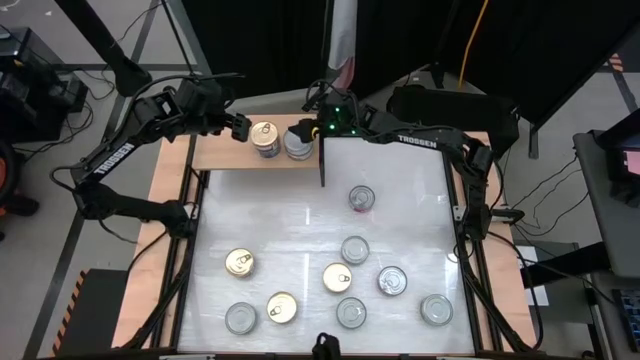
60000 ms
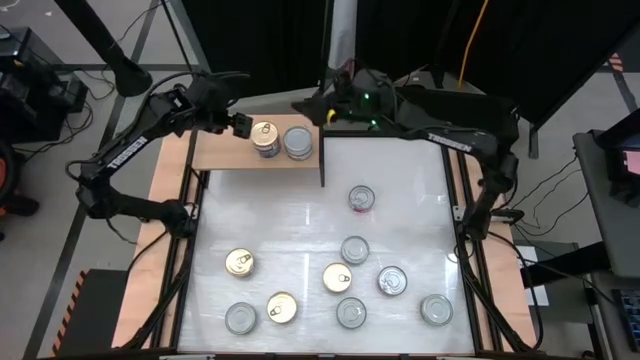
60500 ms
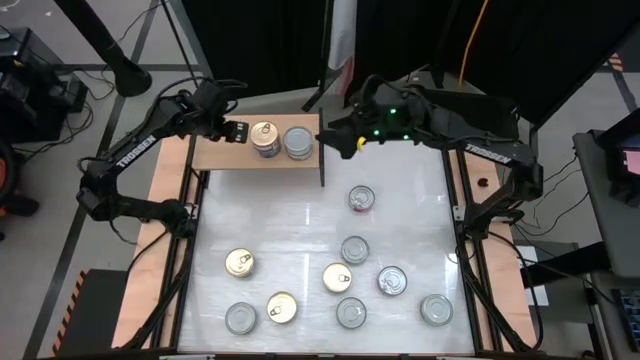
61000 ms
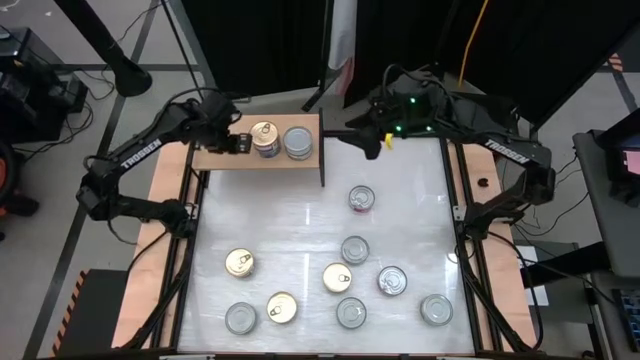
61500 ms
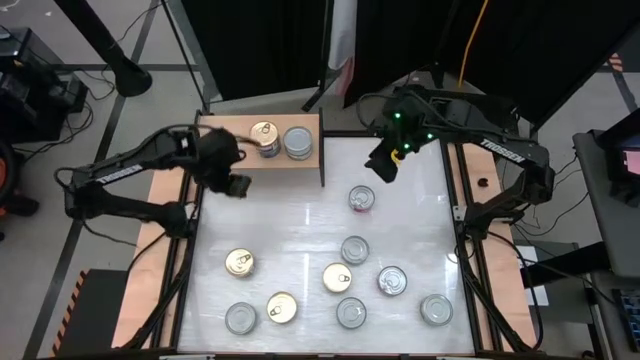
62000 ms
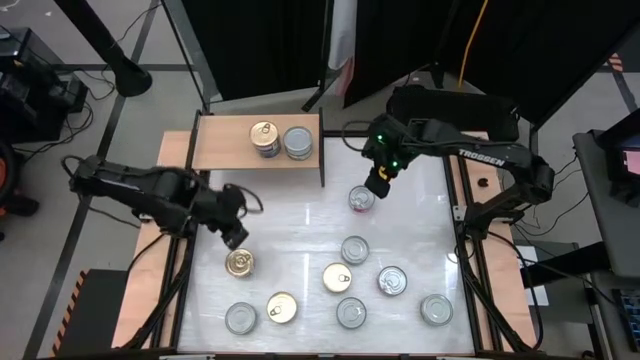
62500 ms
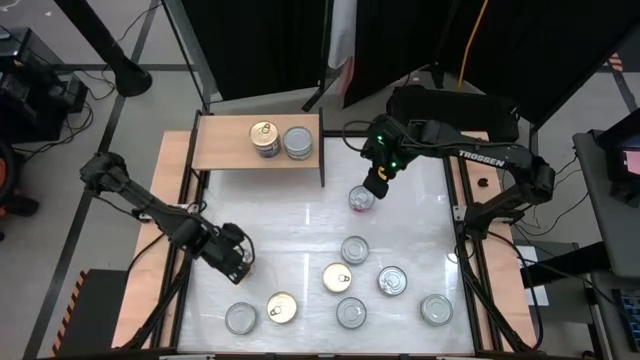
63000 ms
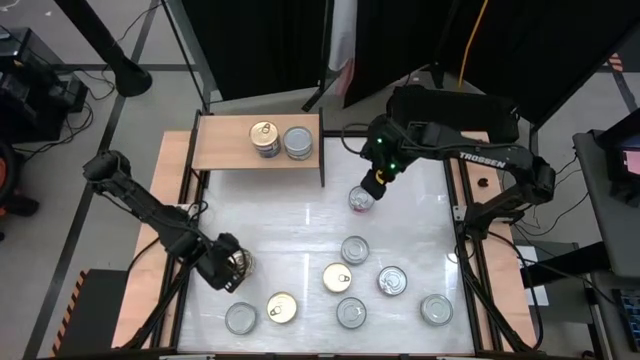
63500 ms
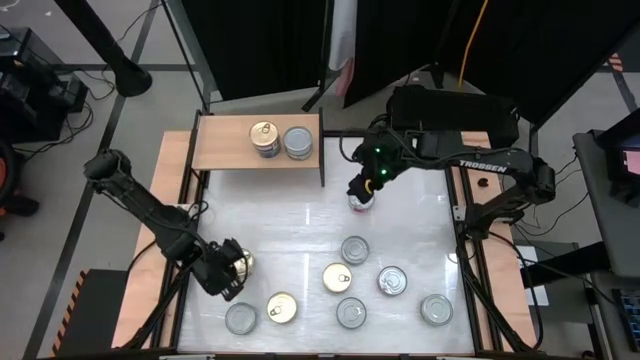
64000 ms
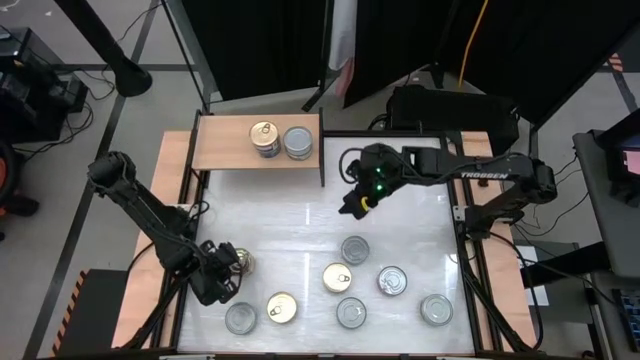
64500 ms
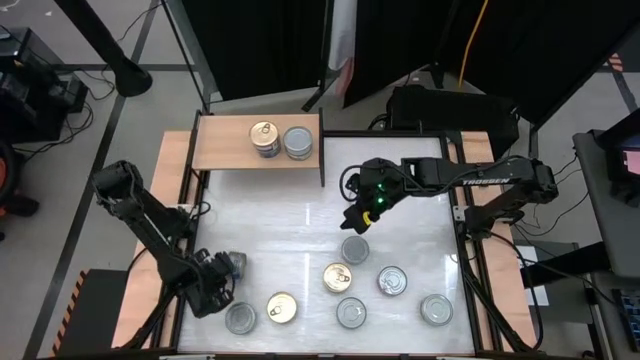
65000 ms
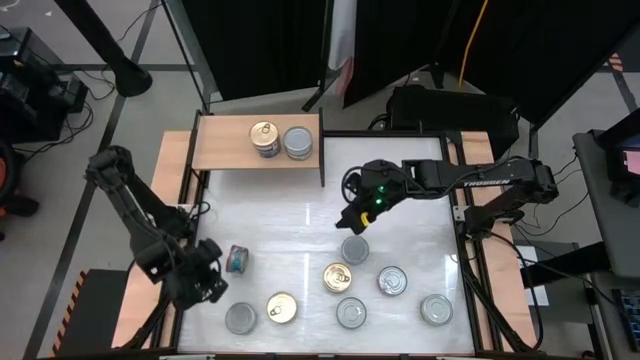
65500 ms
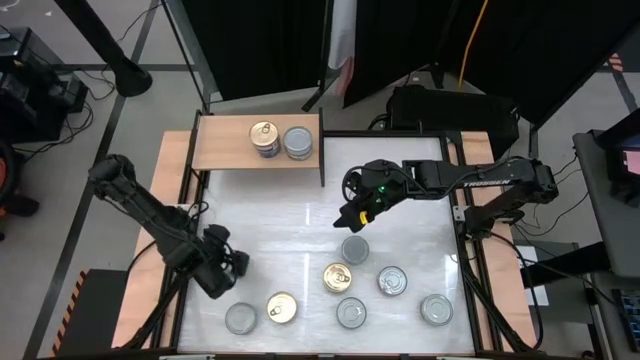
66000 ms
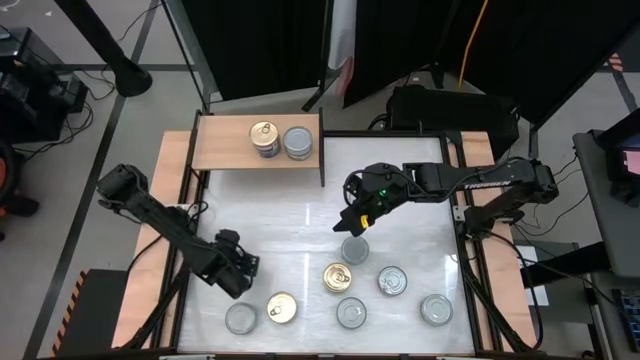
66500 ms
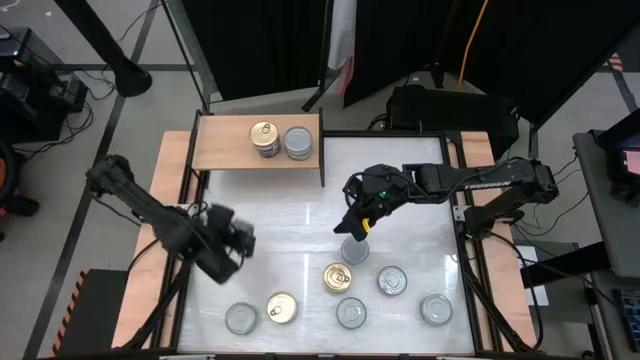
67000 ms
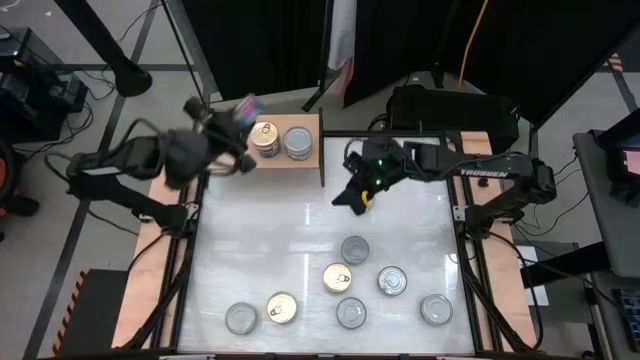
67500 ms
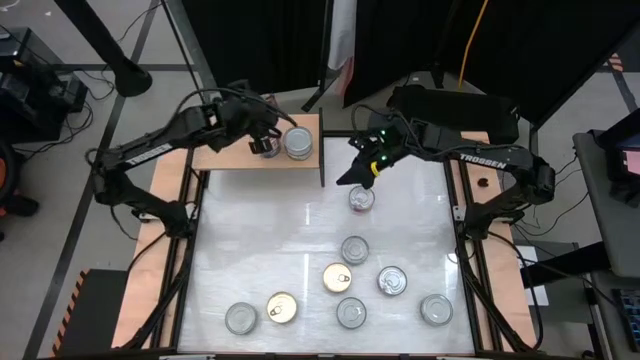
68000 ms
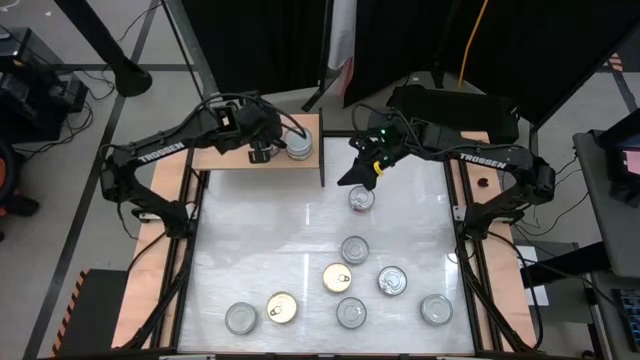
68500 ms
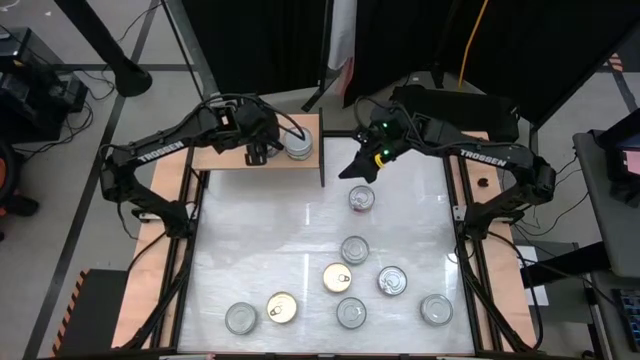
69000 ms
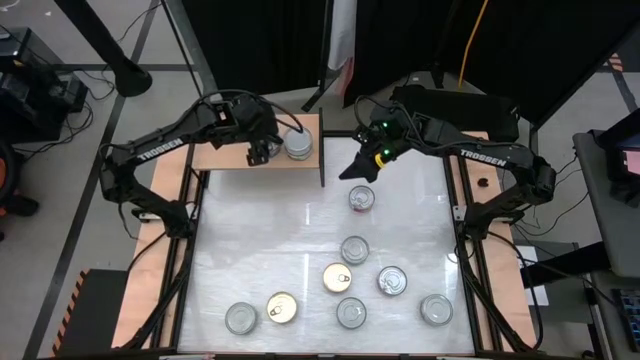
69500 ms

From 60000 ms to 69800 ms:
Task: Stack canned seafood by type on shelf
Stack the blue pink tuna can on top of the blue pink tuna cans on the shelf

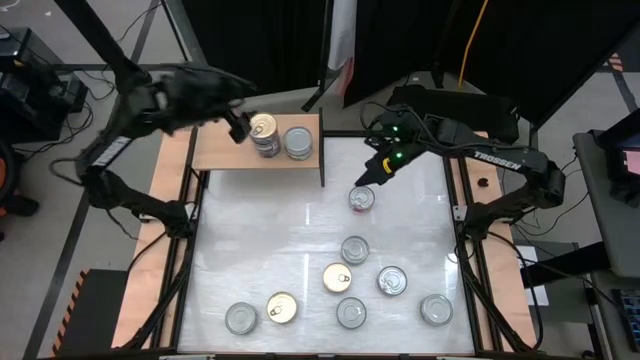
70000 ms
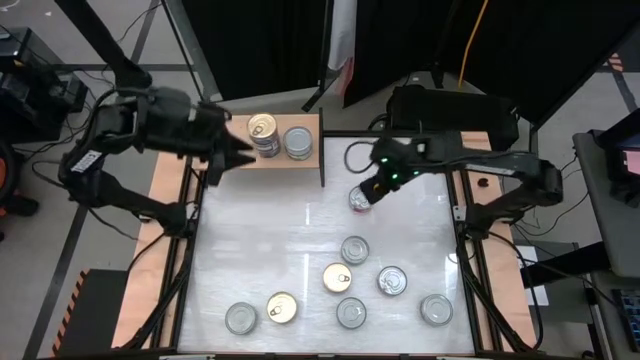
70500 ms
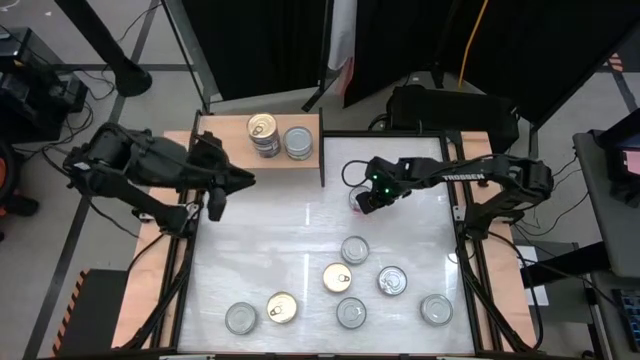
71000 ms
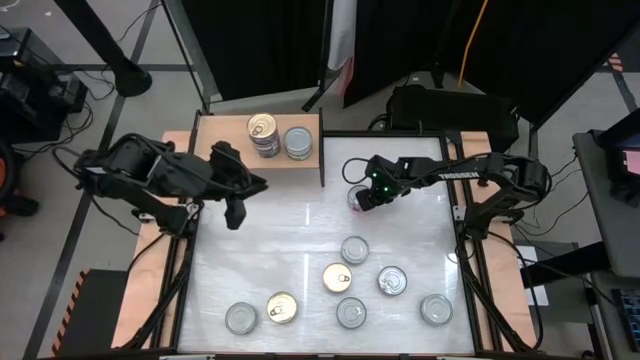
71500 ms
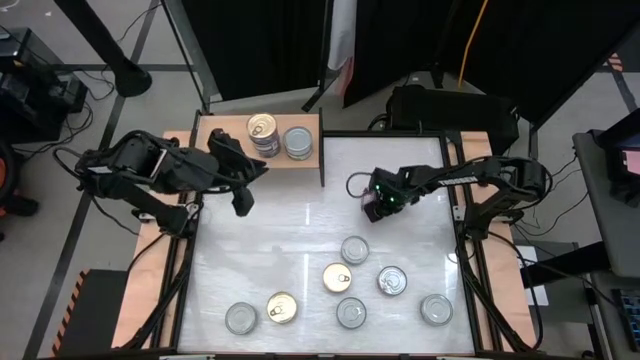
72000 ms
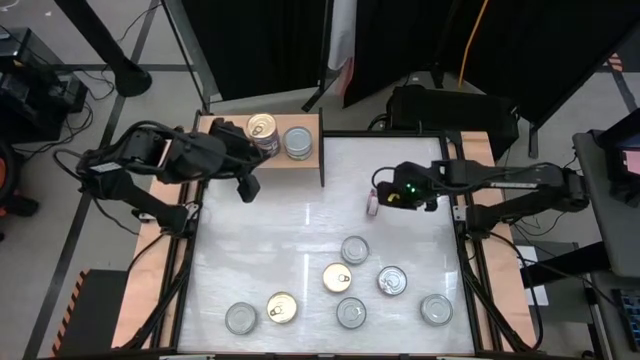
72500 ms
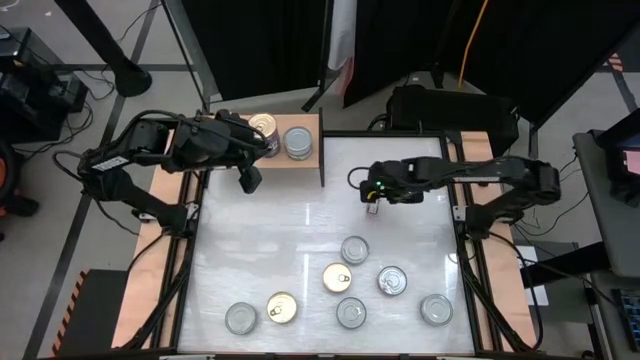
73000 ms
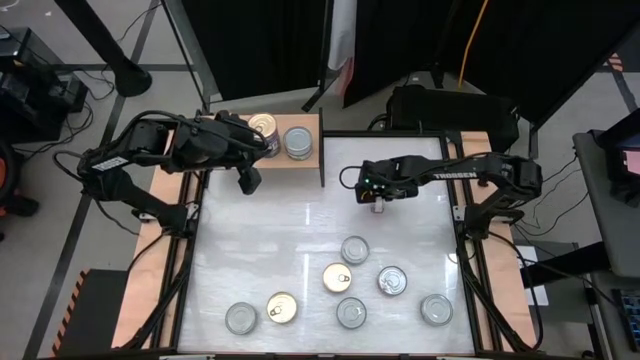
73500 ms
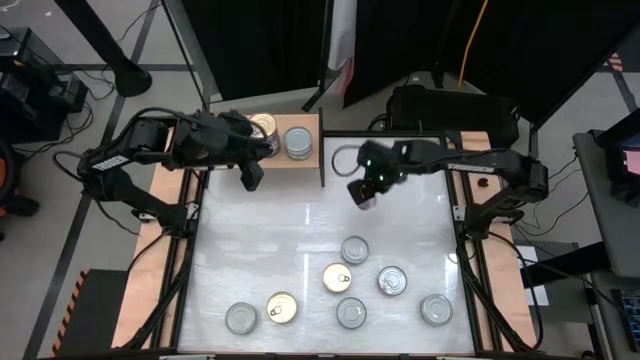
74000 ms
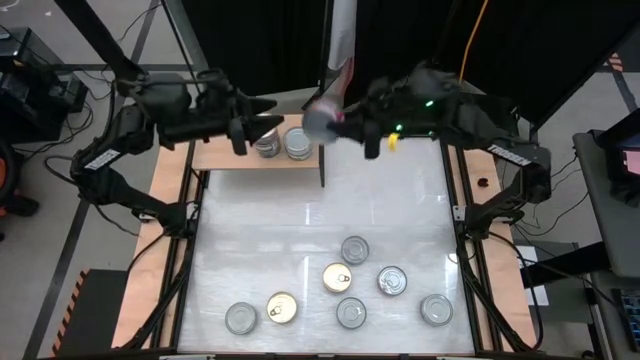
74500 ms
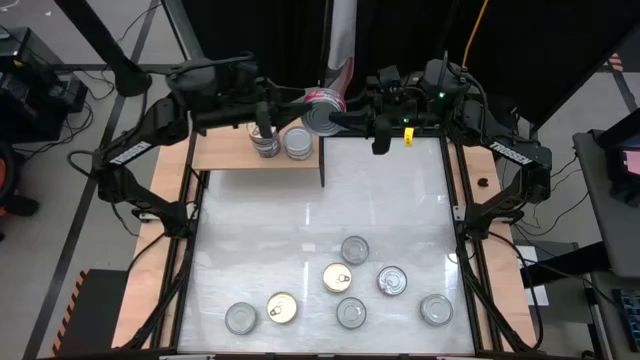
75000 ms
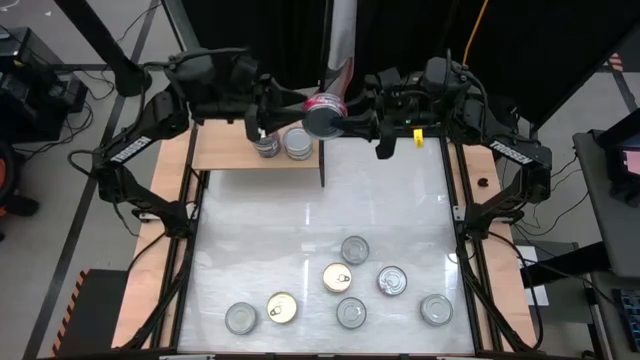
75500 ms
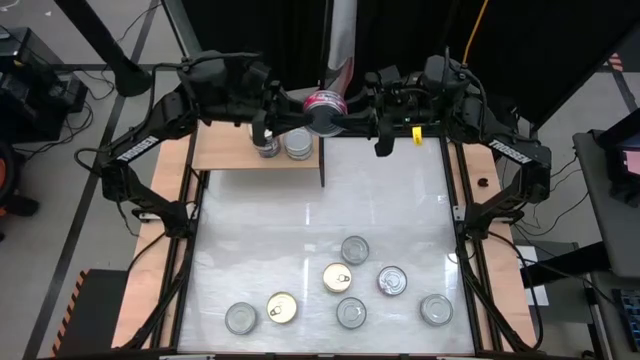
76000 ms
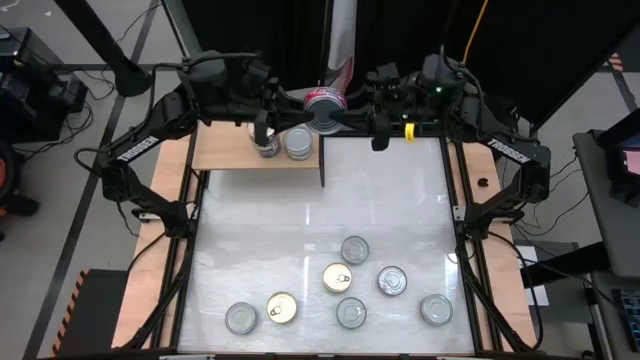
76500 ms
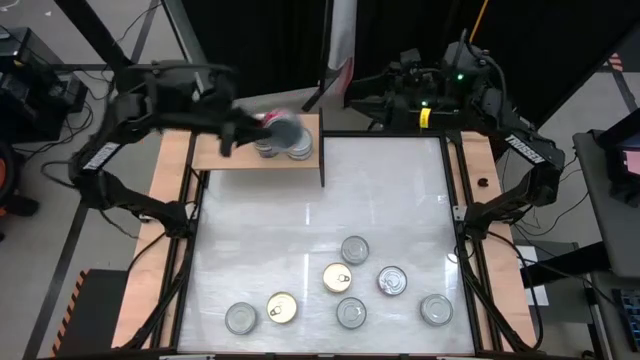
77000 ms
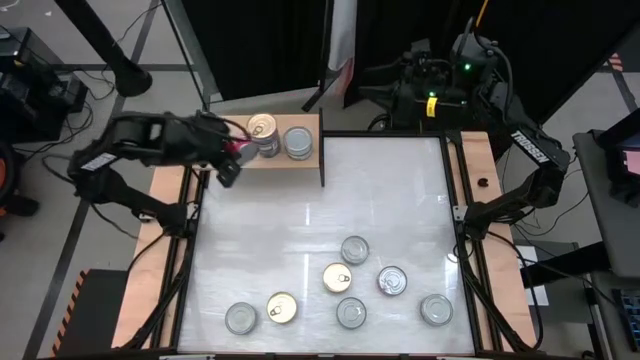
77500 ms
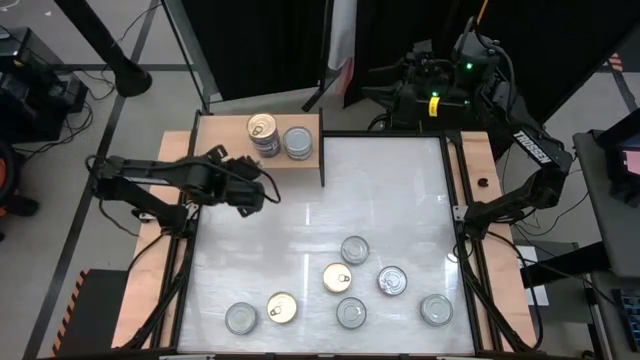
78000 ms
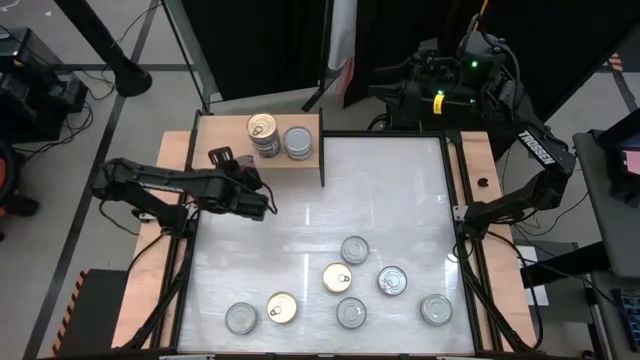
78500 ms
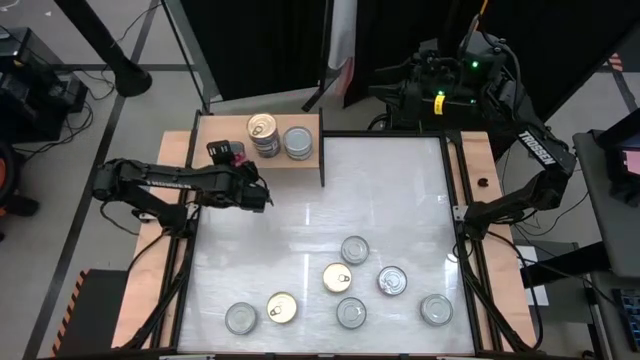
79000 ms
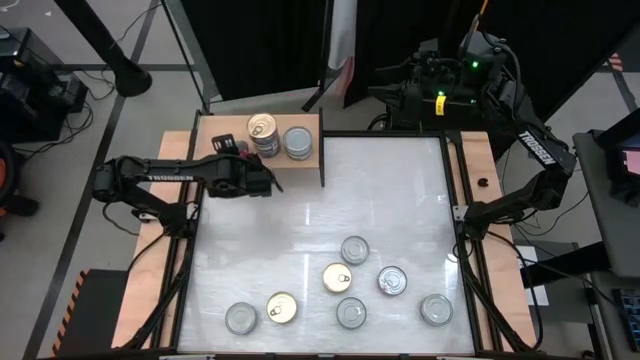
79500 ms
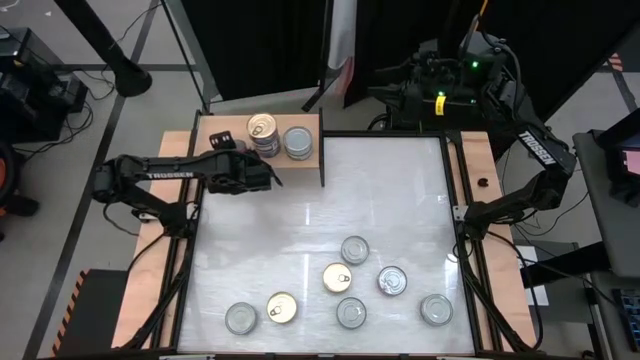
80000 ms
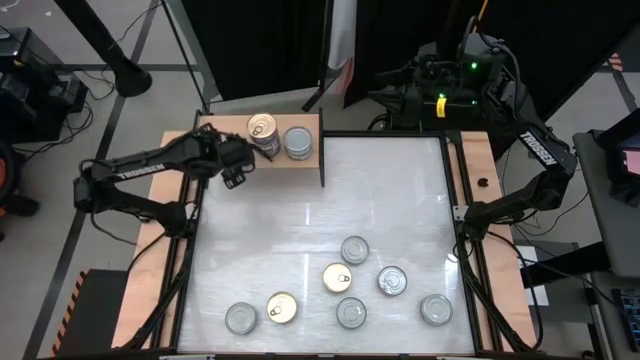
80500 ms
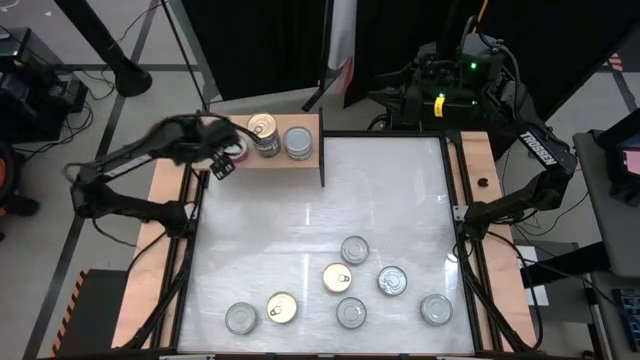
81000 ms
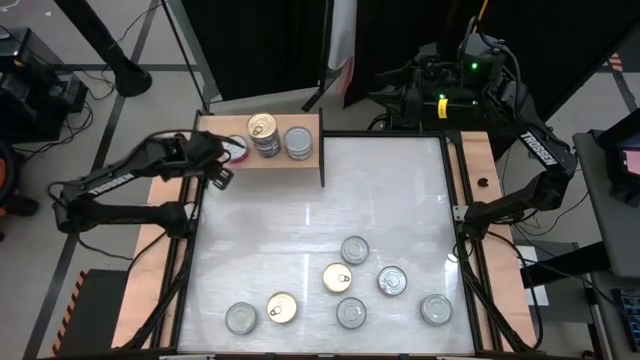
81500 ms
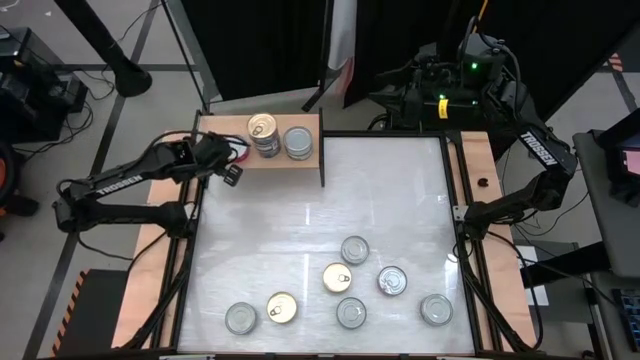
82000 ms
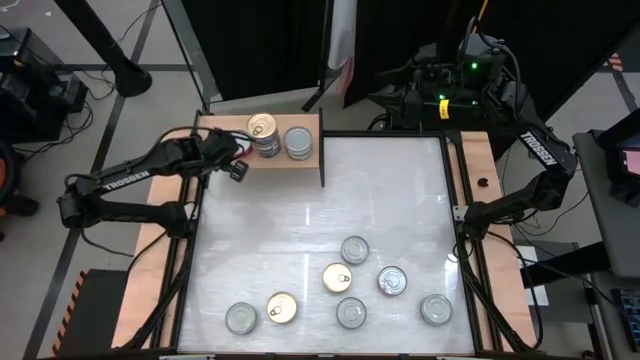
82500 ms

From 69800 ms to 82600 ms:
Put the red tuna can on the the shelf
